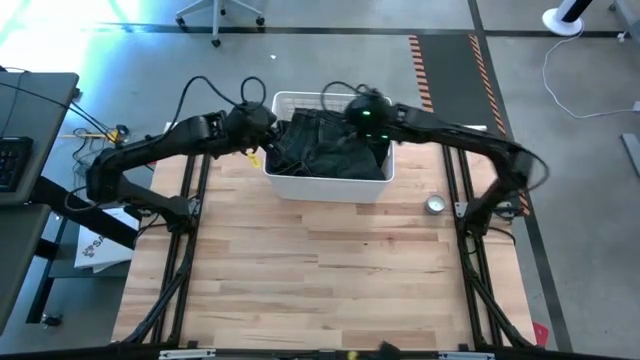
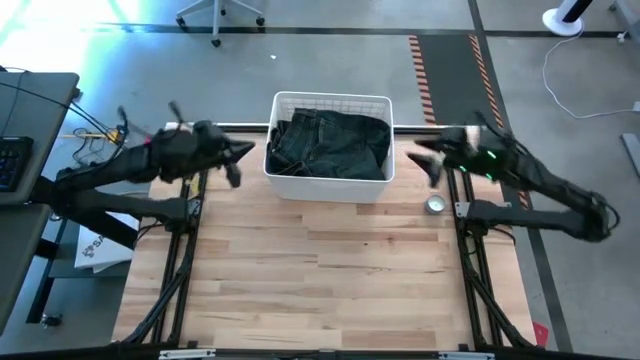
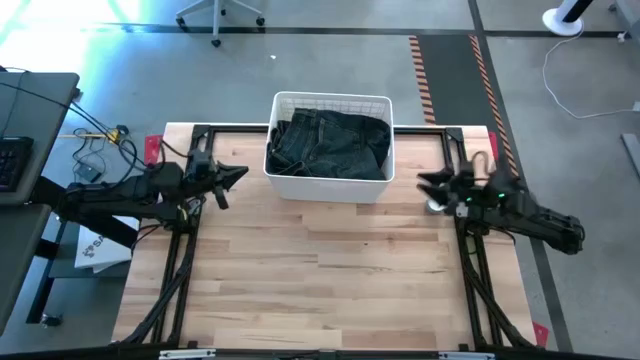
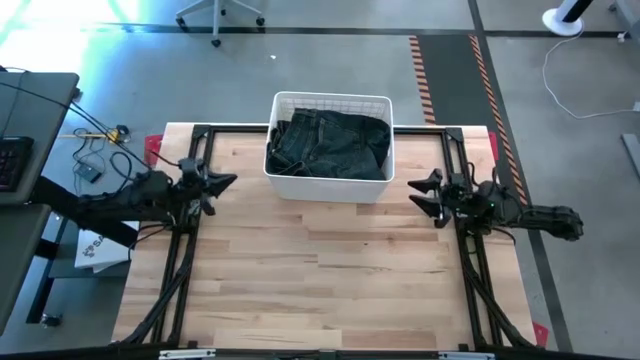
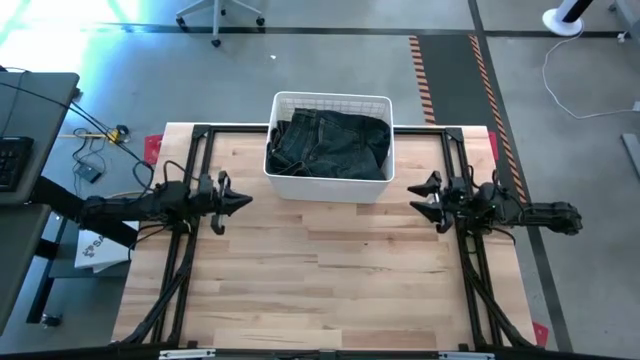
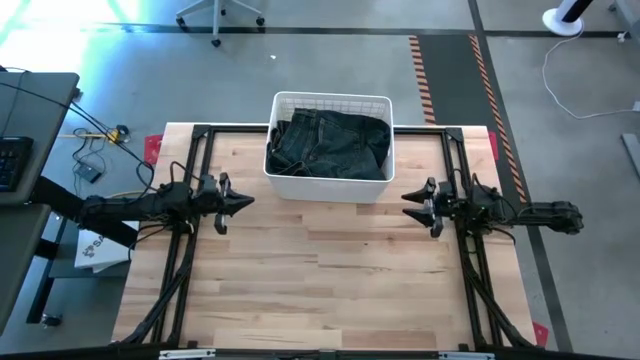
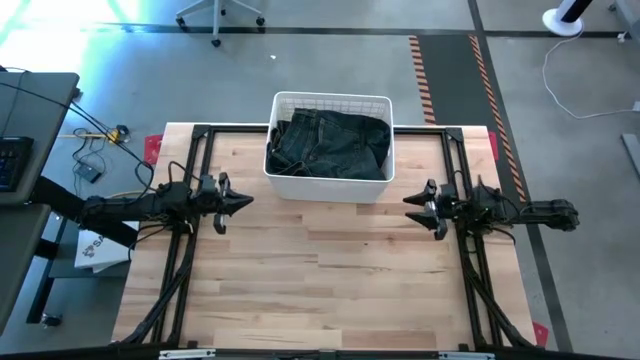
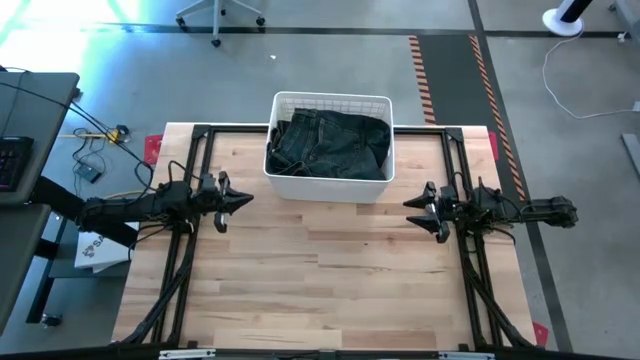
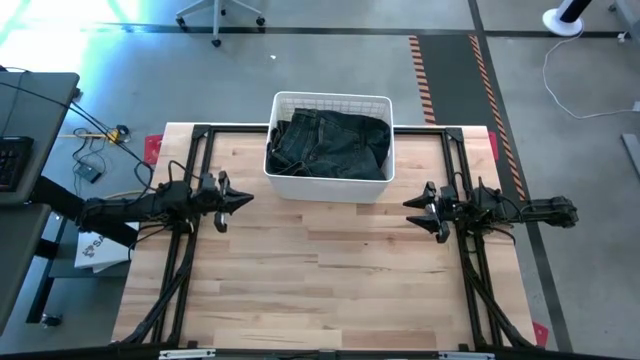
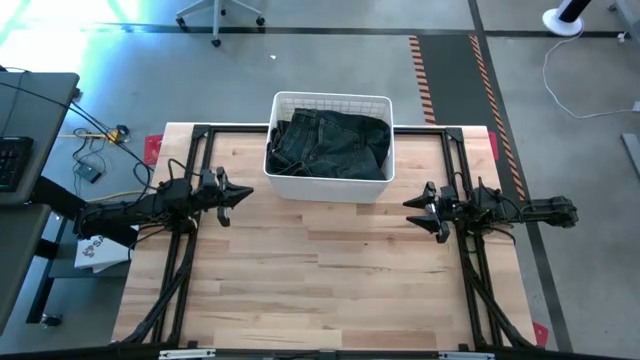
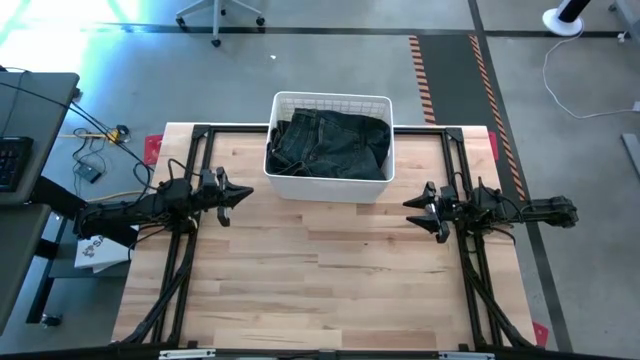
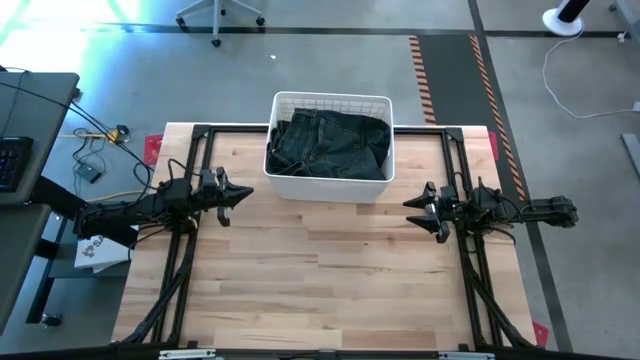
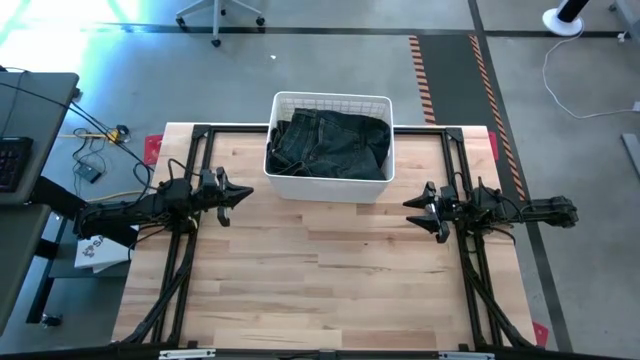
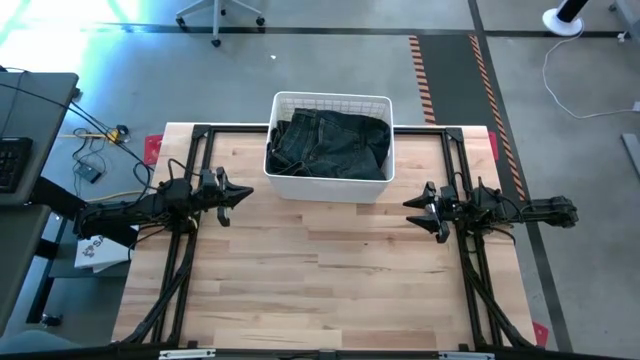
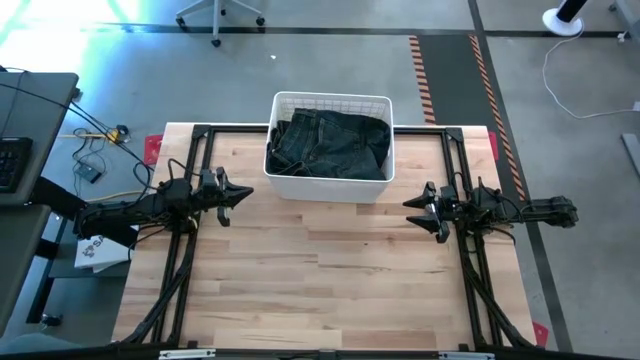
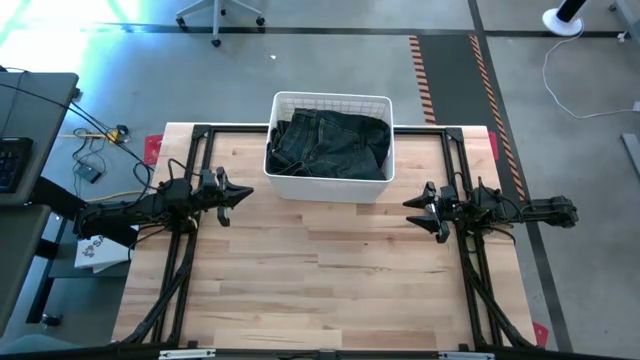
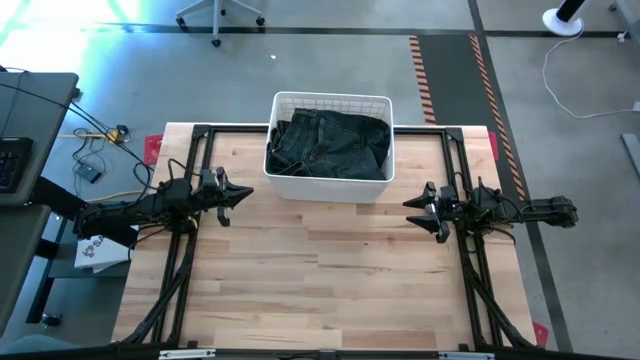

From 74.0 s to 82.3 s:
Task: Sort clothes
Return to Home Position

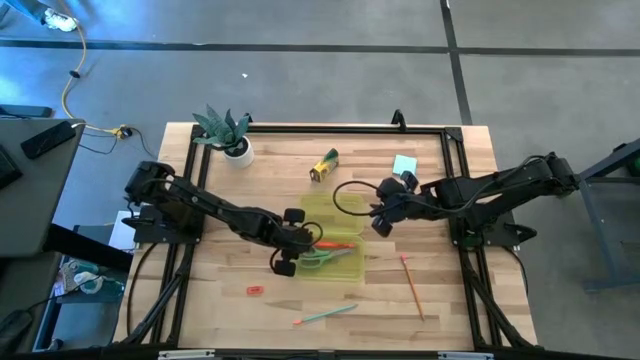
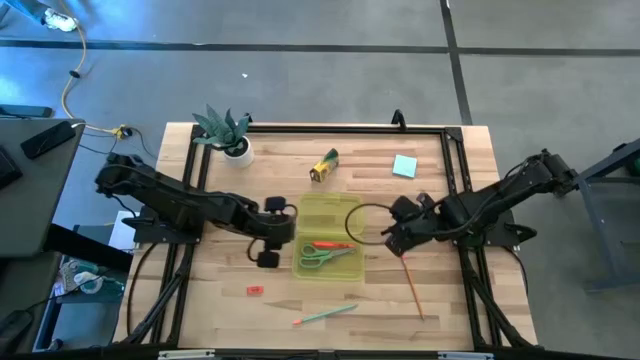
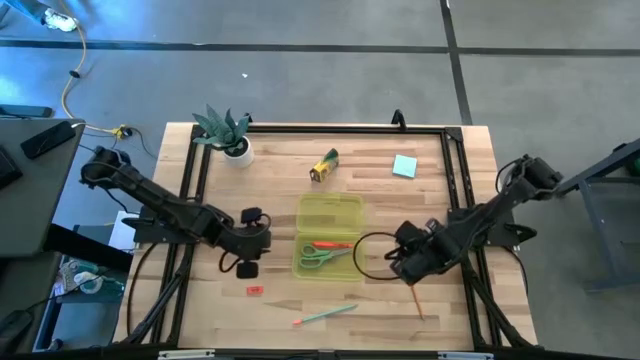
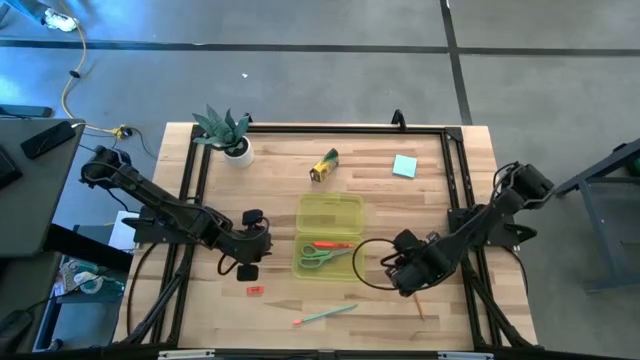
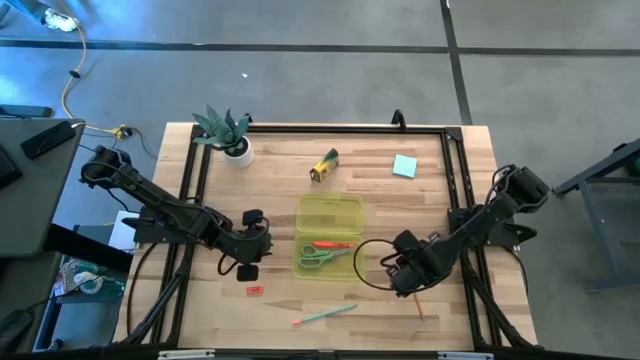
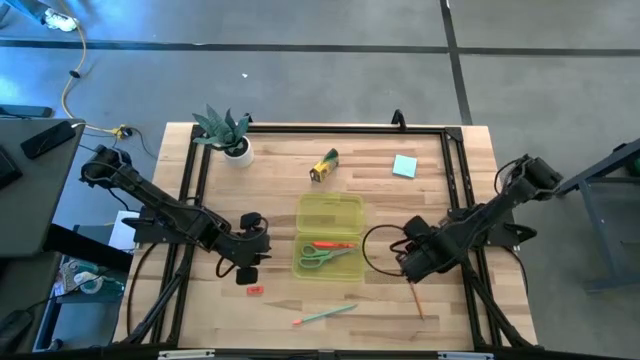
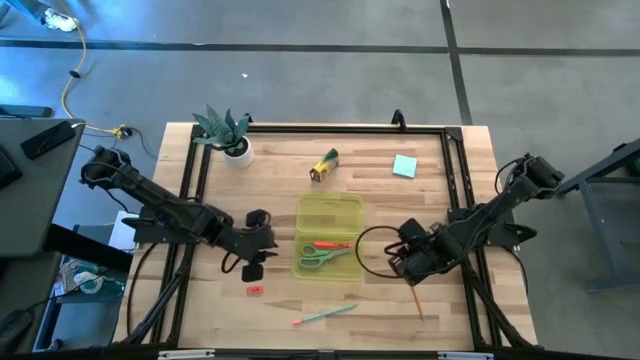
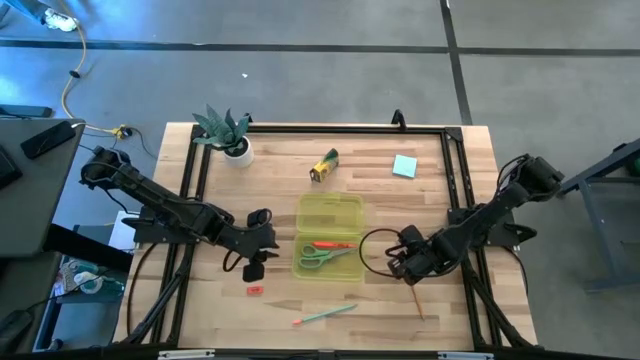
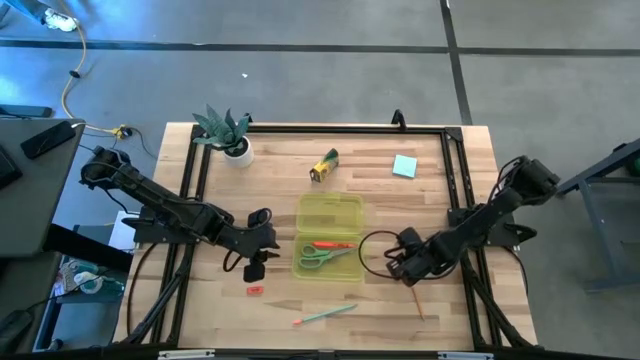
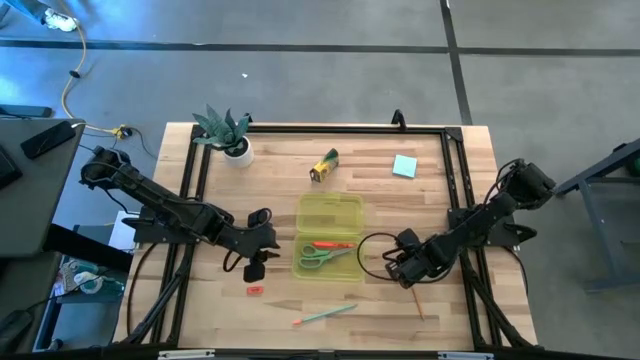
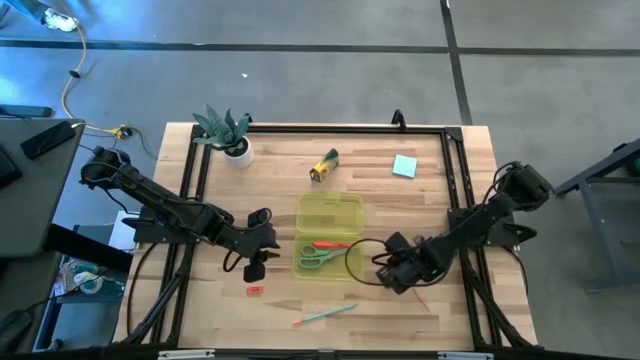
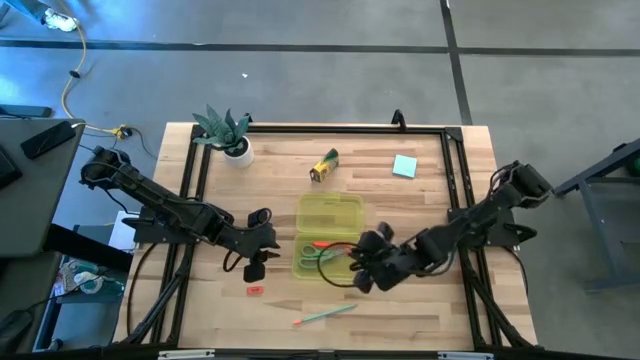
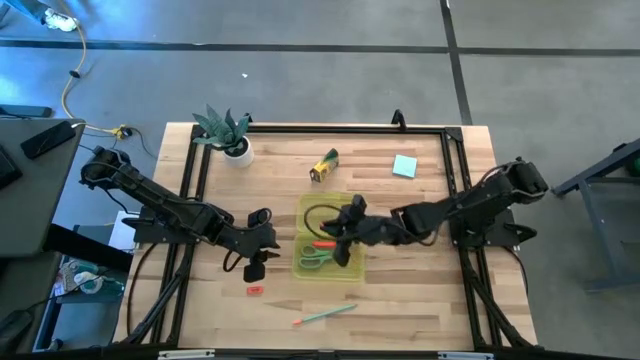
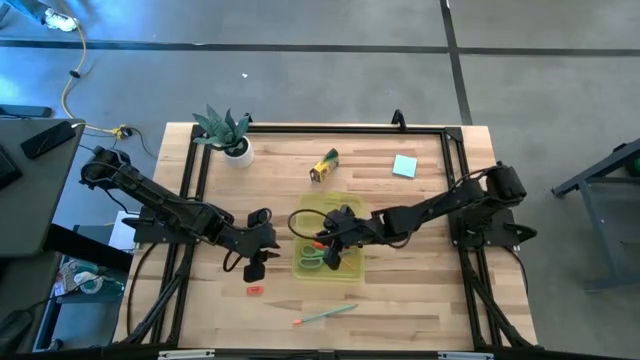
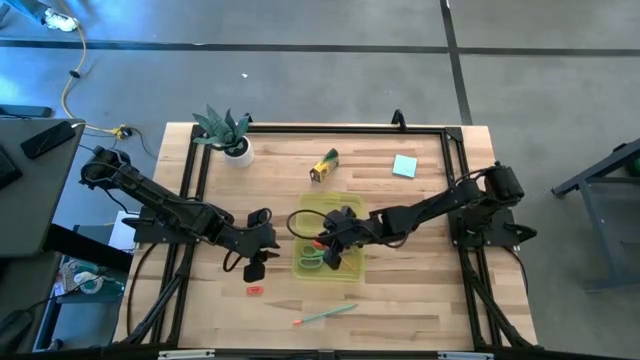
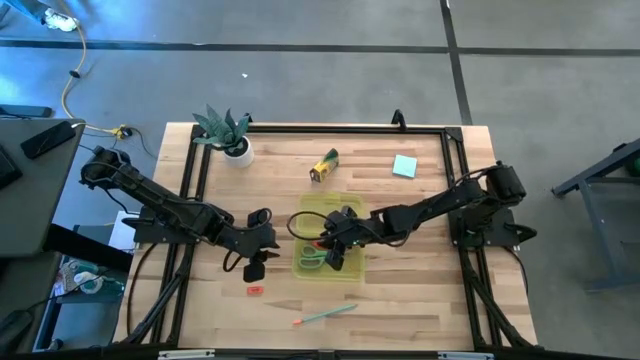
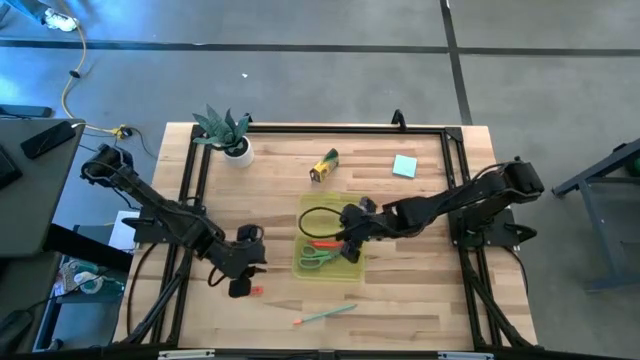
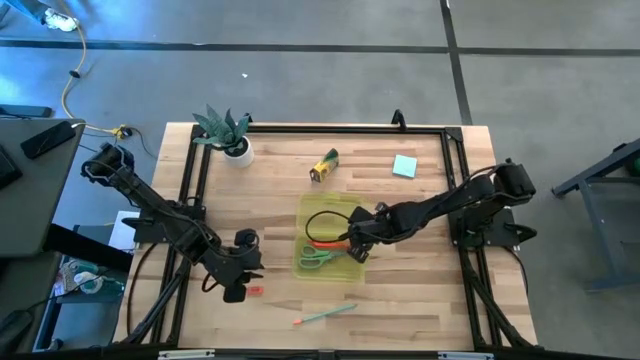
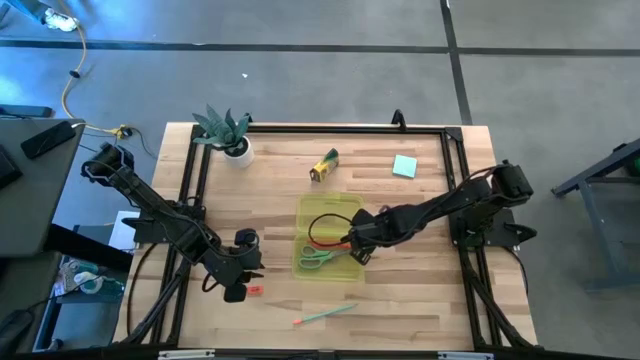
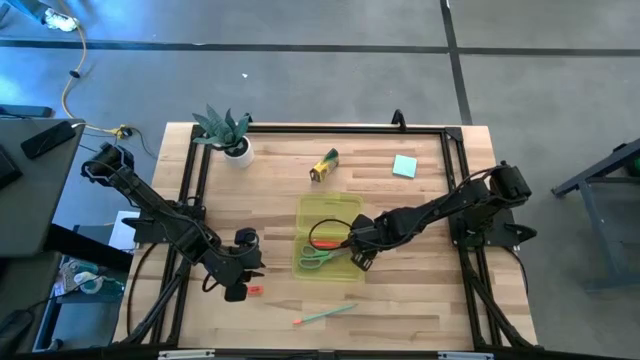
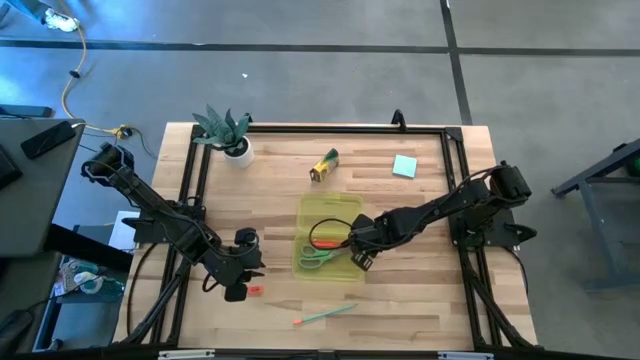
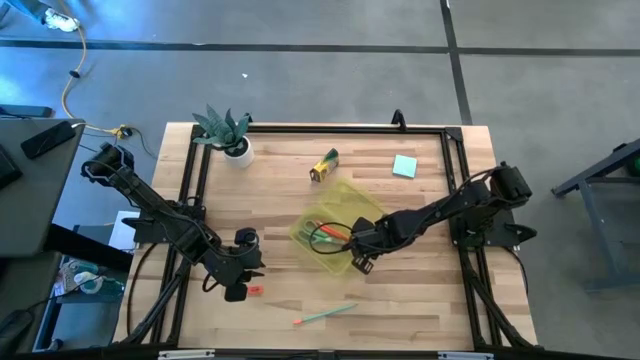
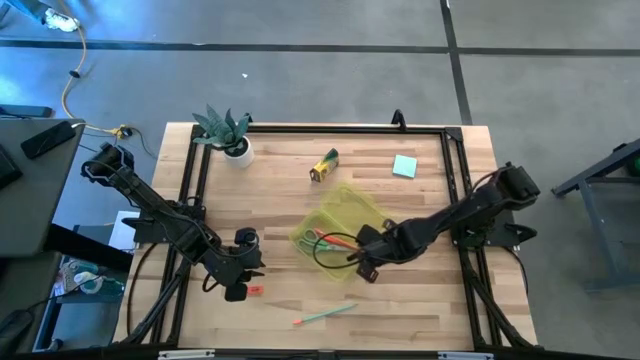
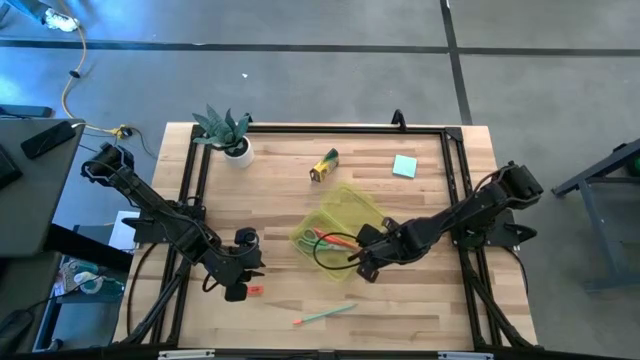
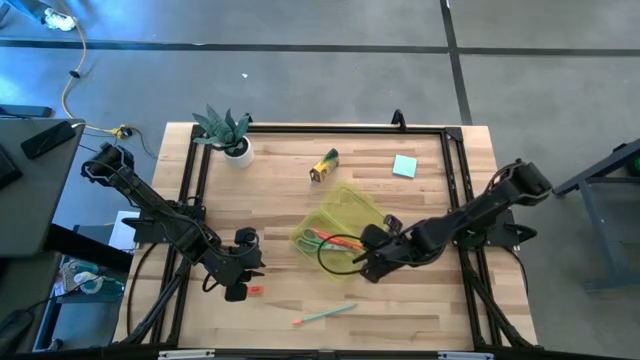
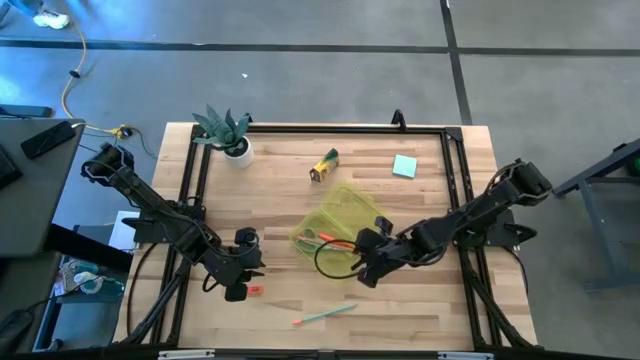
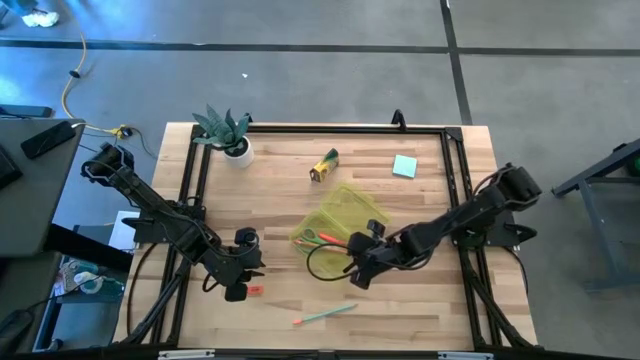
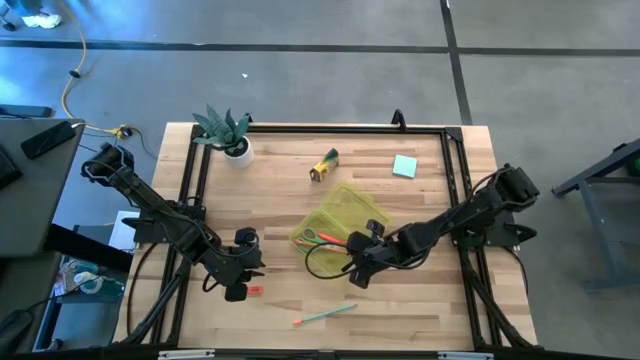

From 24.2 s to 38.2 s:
Task: Pack school essentials
Put the orange pencil into the yellow box
